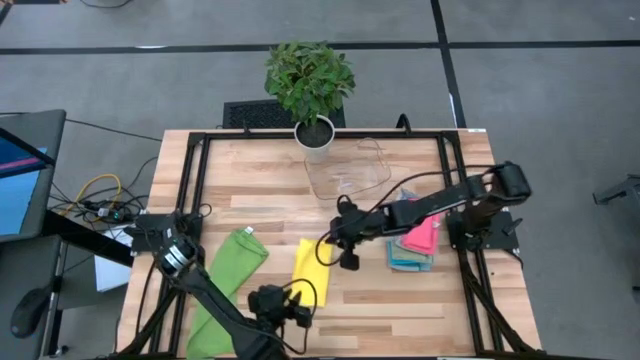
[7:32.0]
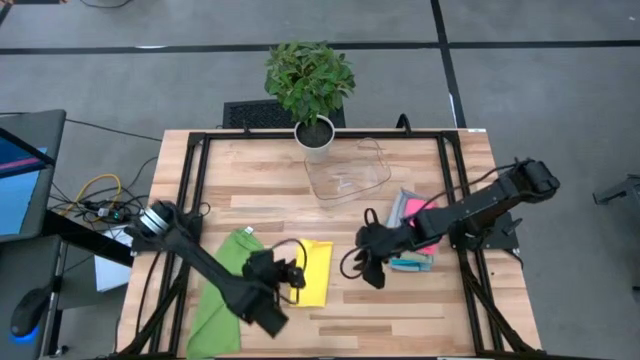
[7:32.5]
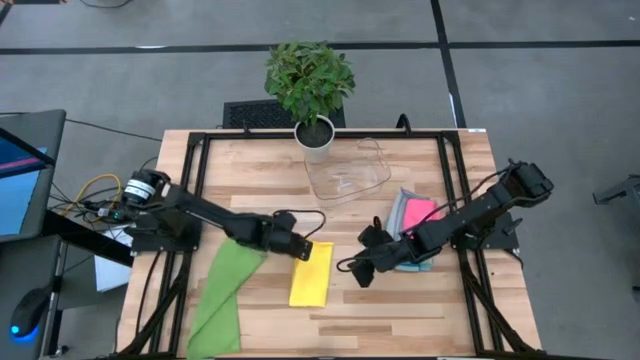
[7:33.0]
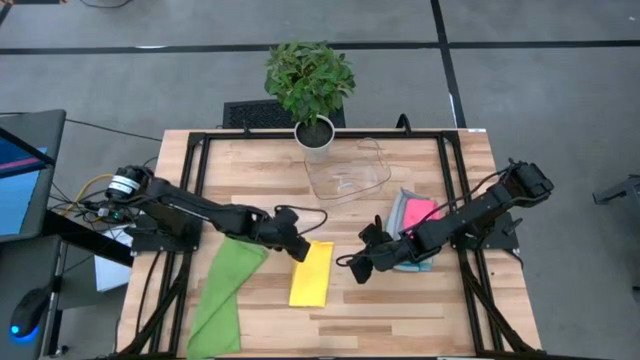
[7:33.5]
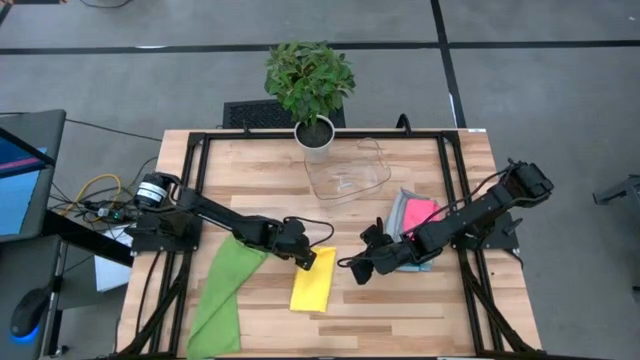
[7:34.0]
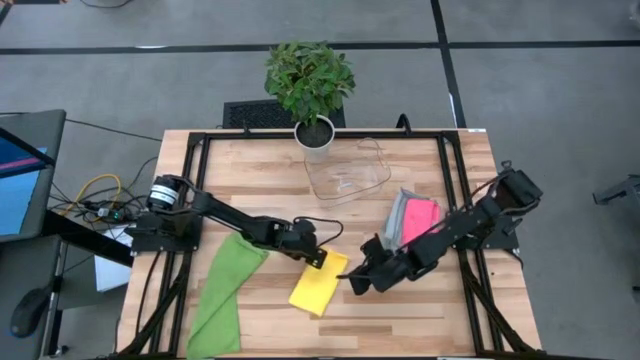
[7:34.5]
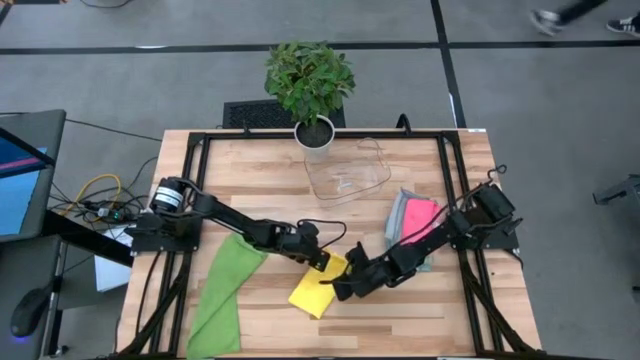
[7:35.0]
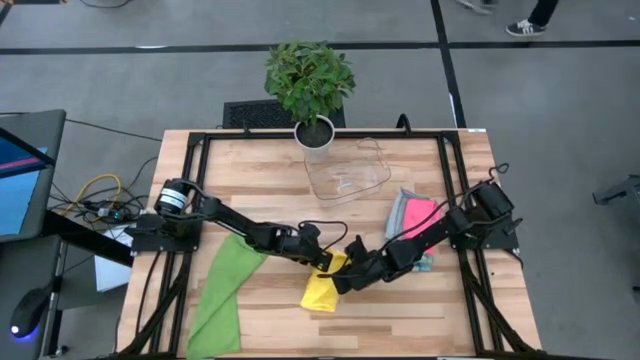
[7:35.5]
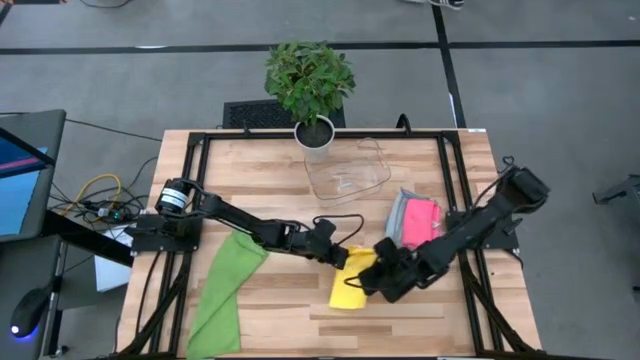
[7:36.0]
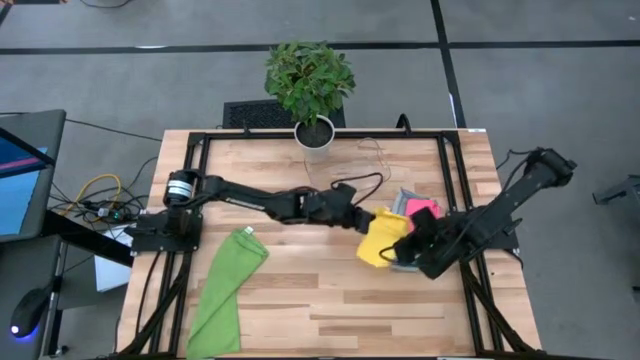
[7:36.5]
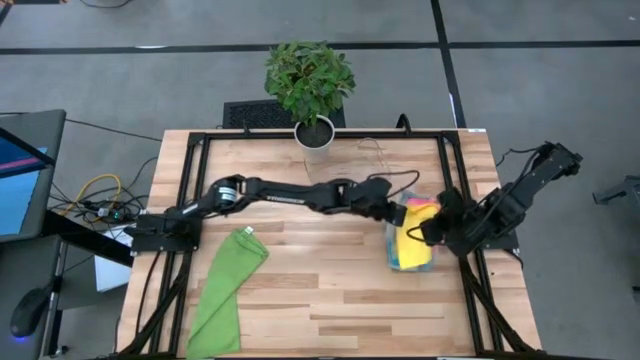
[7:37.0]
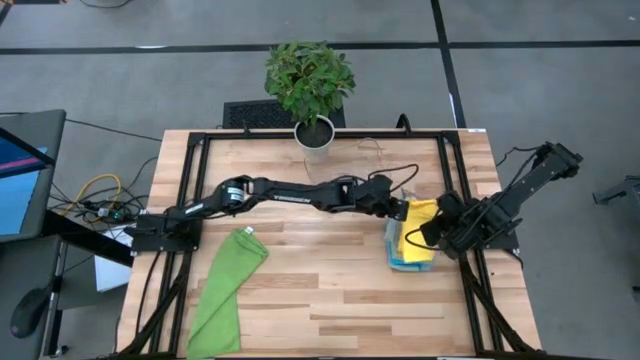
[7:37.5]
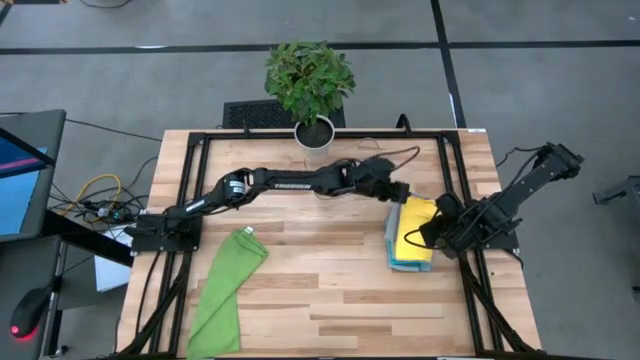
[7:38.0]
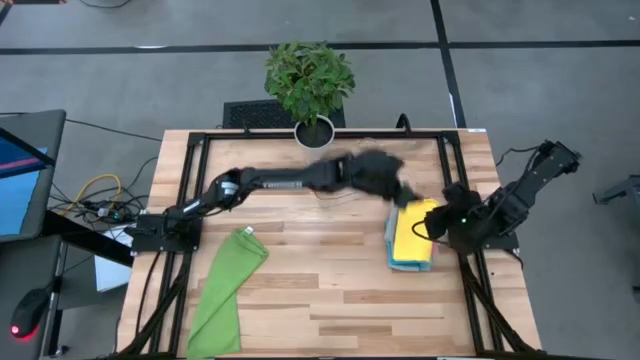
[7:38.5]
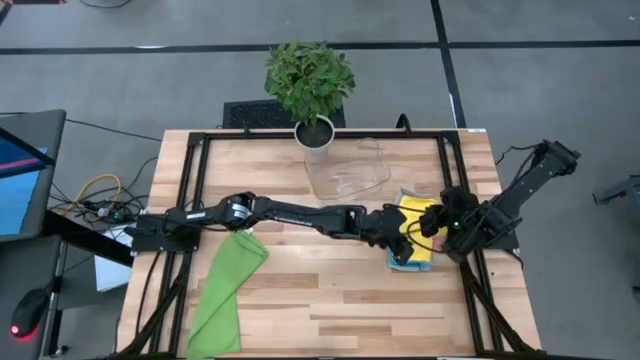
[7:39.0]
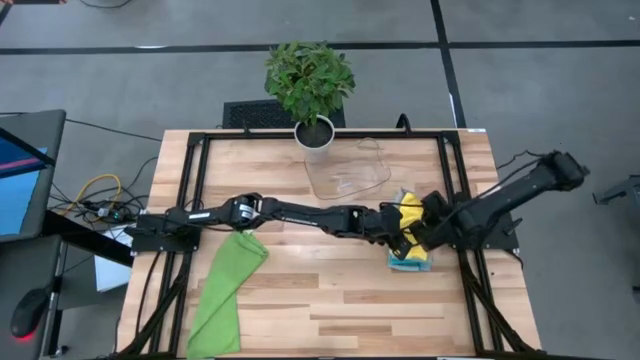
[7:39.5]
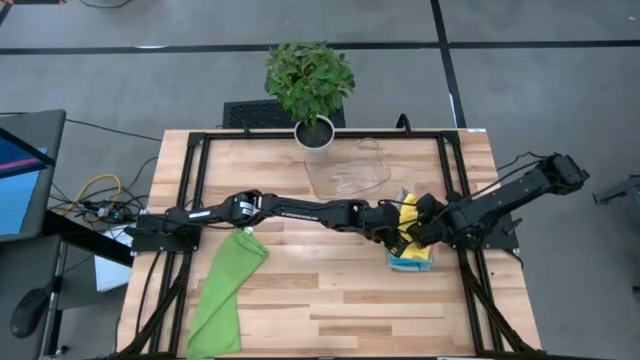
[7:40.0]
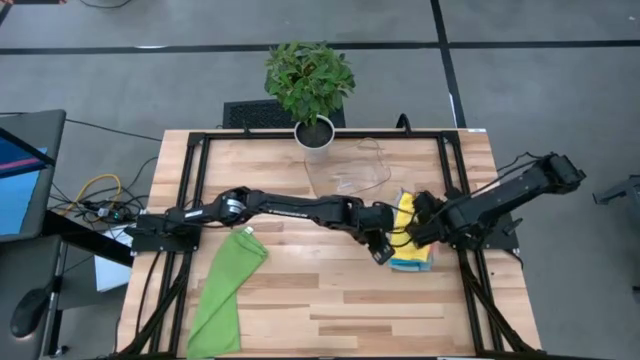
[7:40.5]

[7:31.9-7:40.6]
Task: Fold microfiber towels
Stack the yellow microfiber cloth on top of the pink microfiber cloth

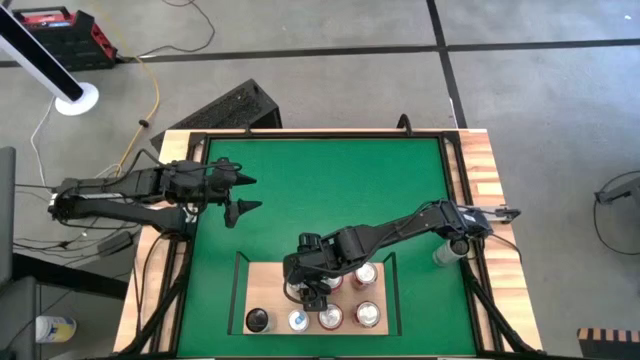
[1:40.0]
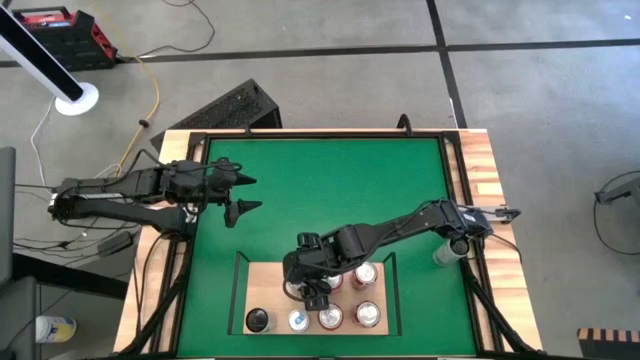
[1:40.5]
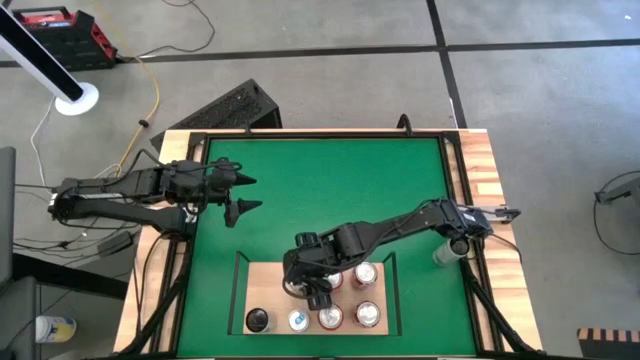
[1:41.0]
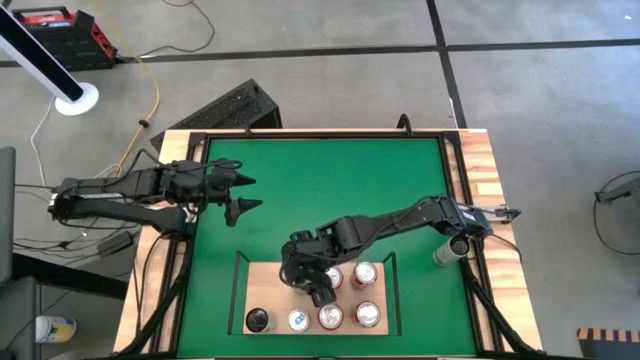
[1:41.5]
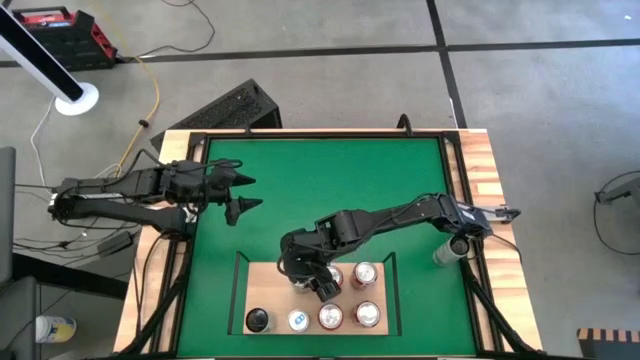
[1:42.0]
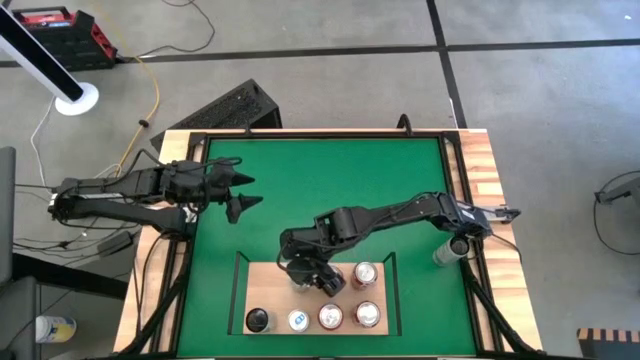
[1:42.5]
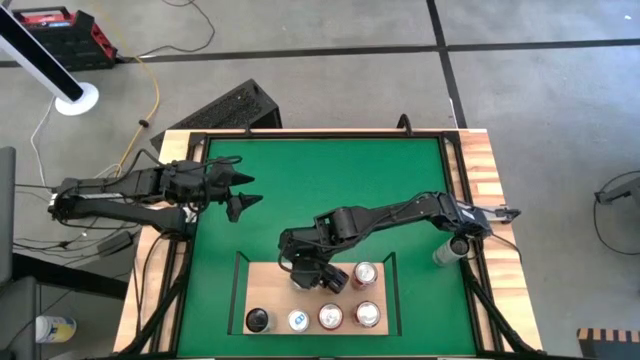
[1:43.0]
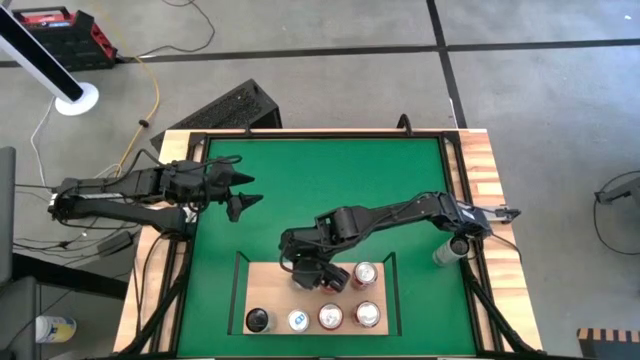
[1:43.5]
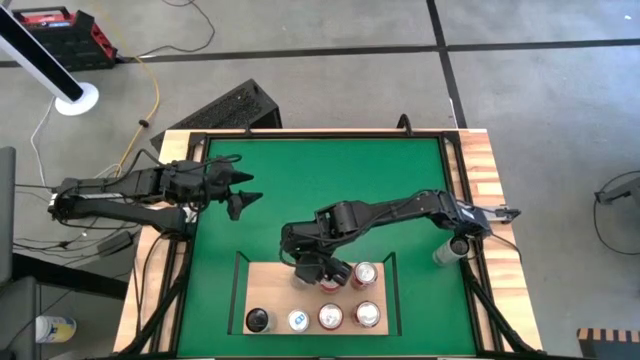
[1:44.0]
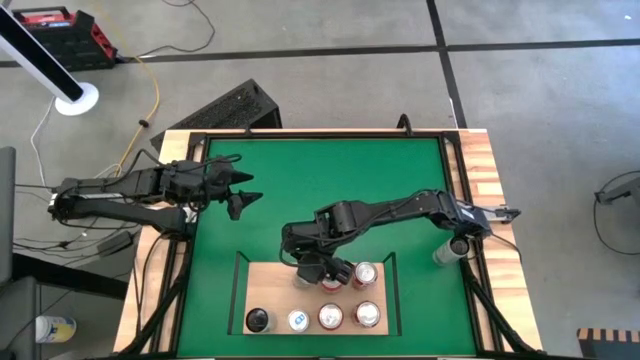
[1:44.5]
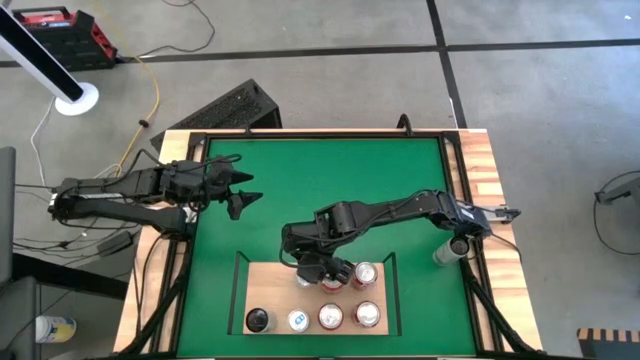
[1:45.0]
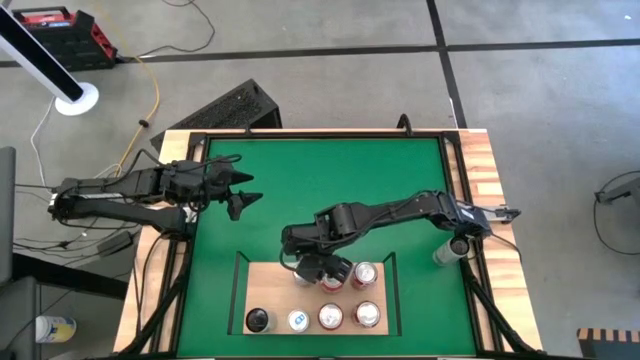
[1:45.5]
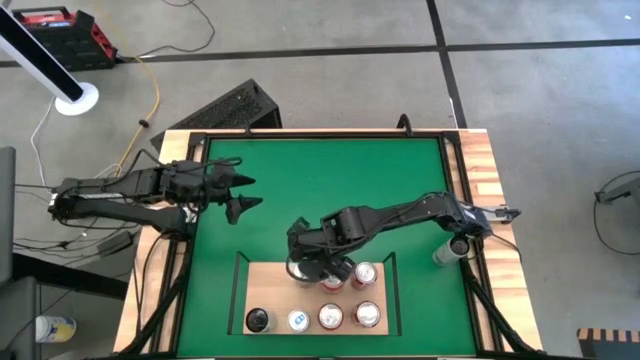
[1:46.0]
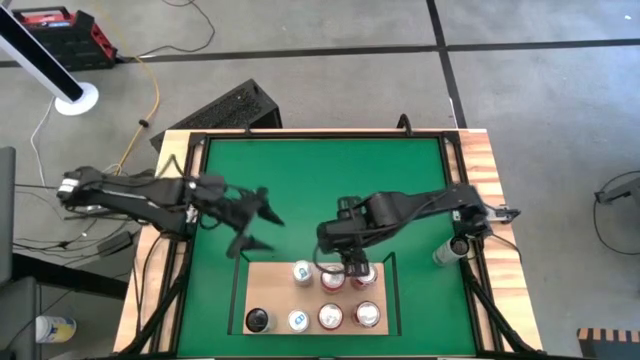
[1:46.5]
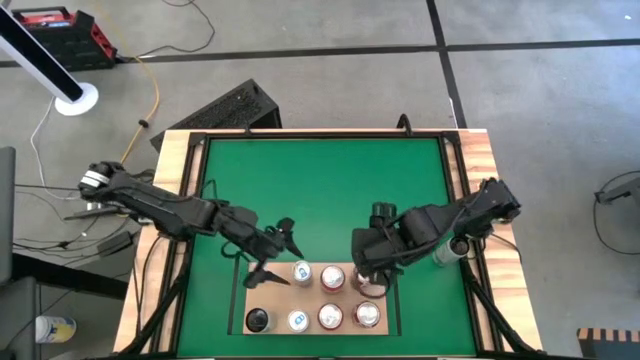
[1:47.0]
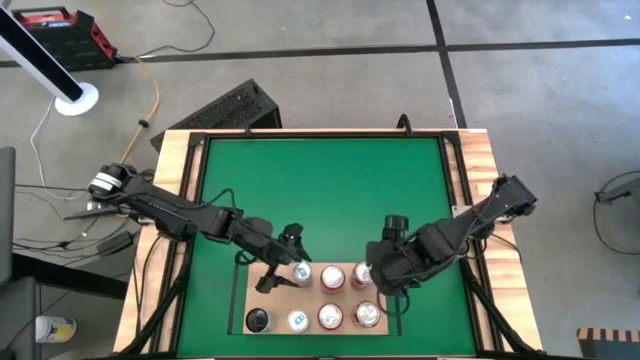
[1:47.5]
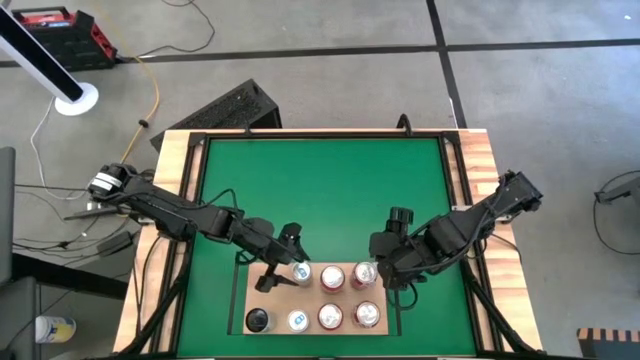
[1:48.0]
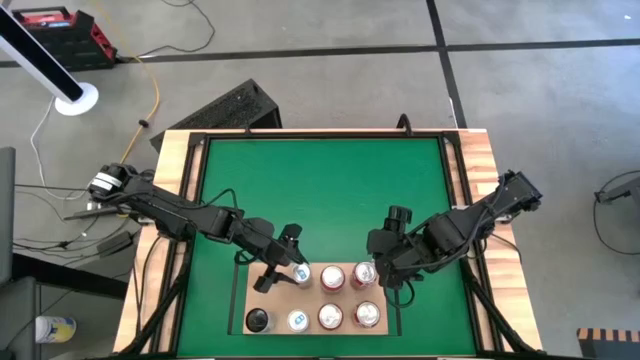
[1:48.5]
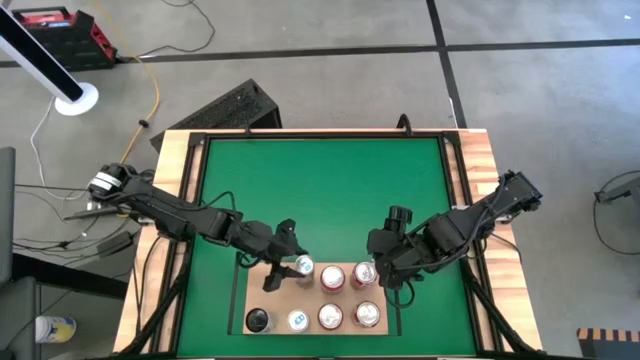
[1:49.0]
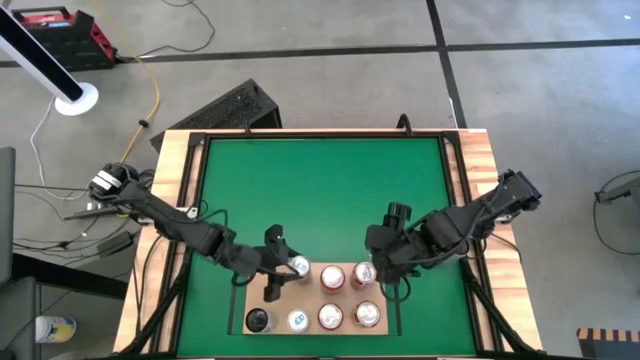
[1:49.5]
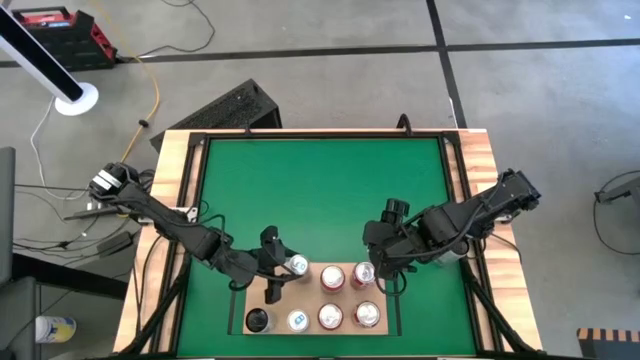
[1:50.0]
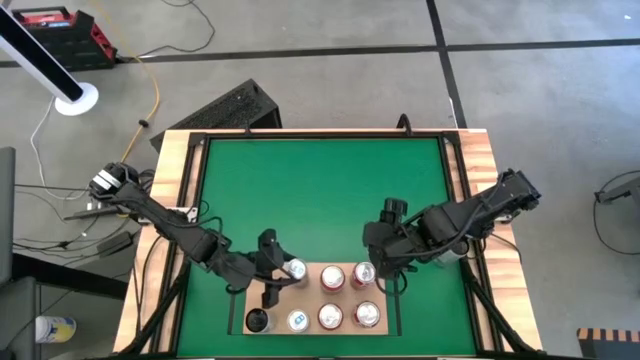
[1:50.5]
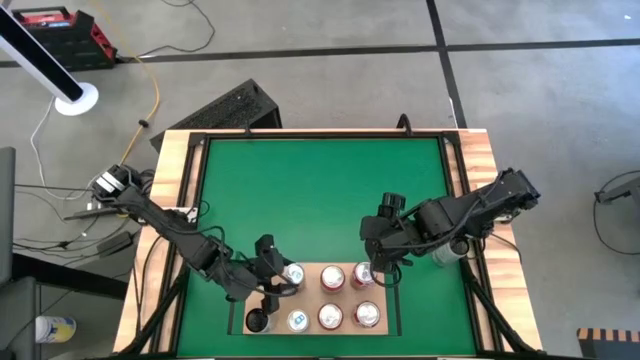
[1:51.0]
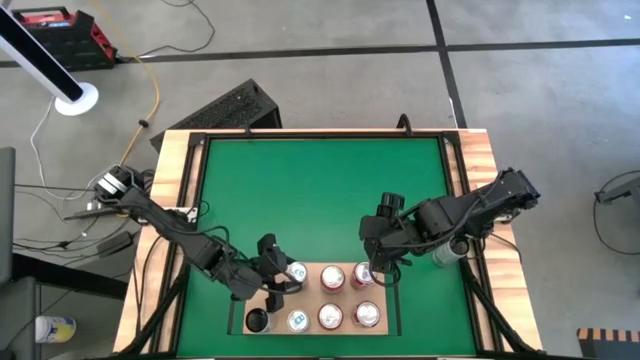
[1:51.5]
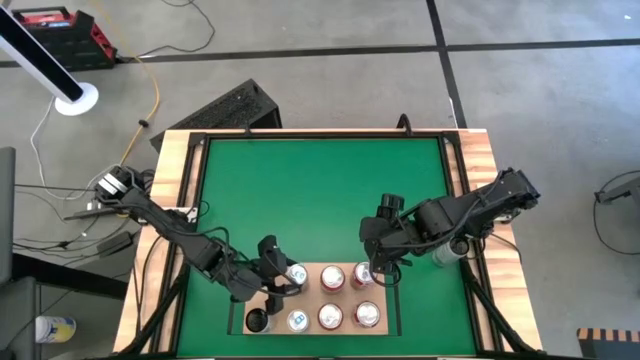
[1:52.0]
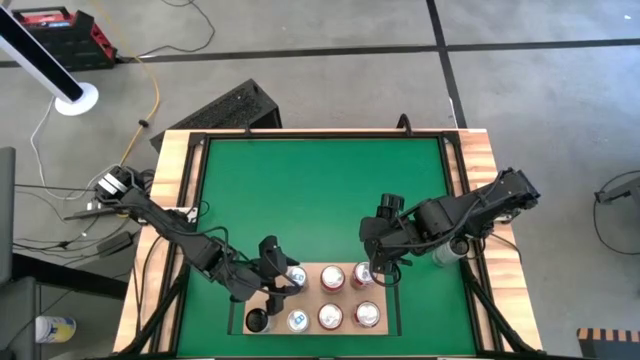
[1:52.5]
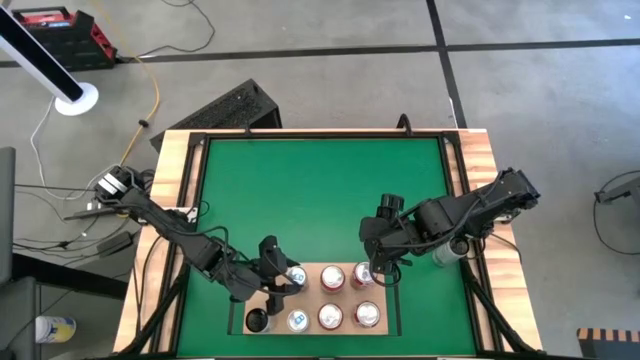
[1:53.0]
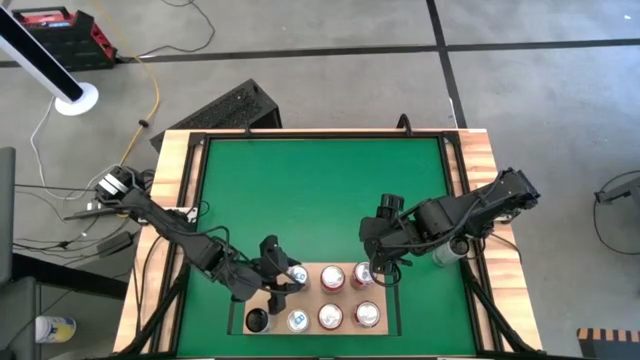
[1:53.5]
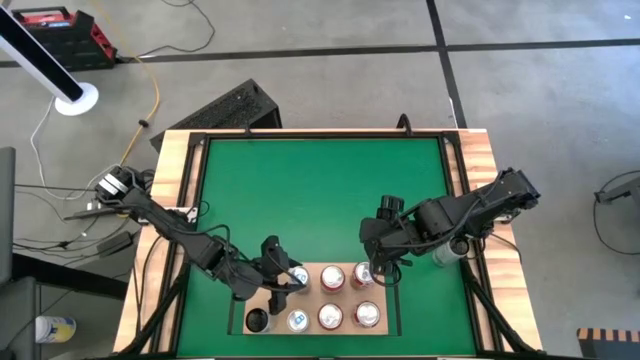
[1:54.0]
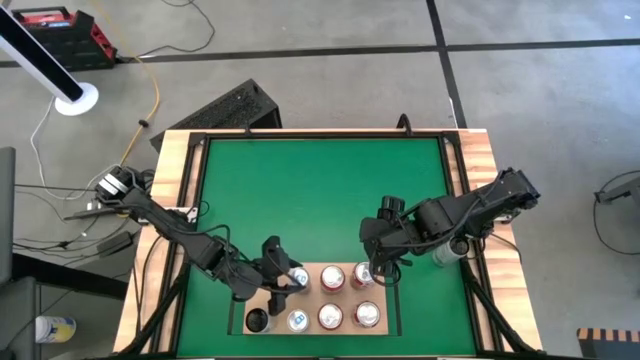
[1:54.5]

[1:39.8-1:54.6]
Task: Place canned beverage on shelf
Put the blue soda can on the shelf aligned with the other blue soda can
